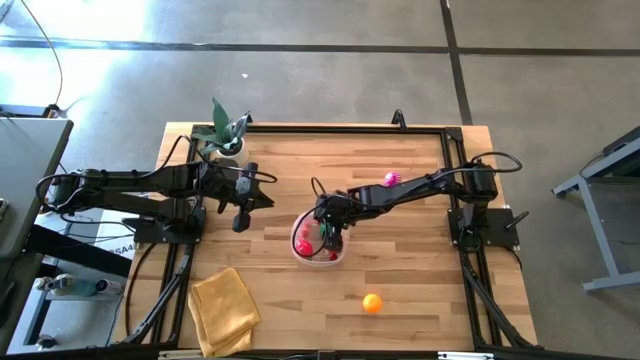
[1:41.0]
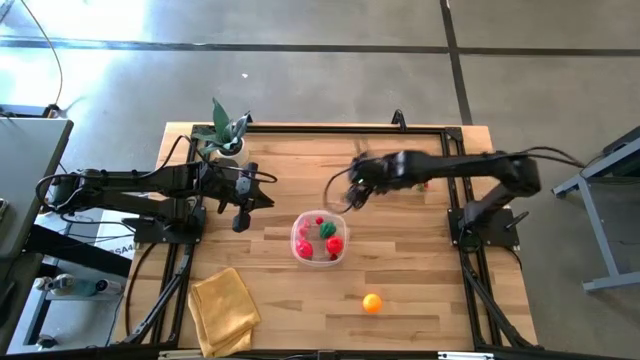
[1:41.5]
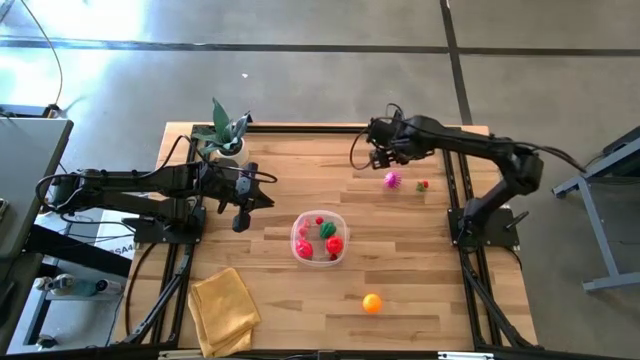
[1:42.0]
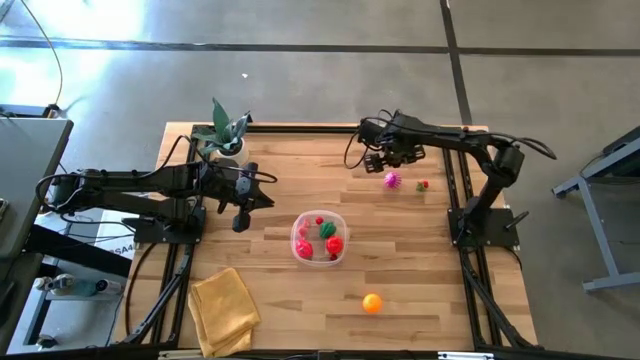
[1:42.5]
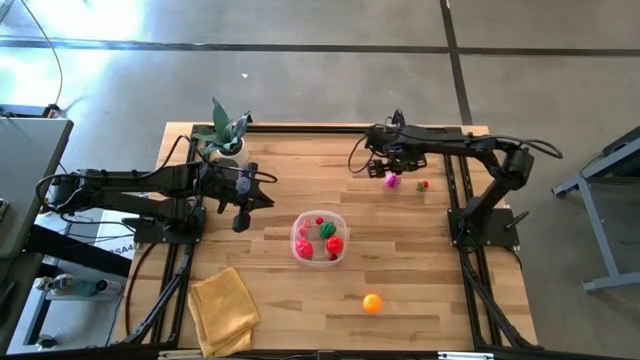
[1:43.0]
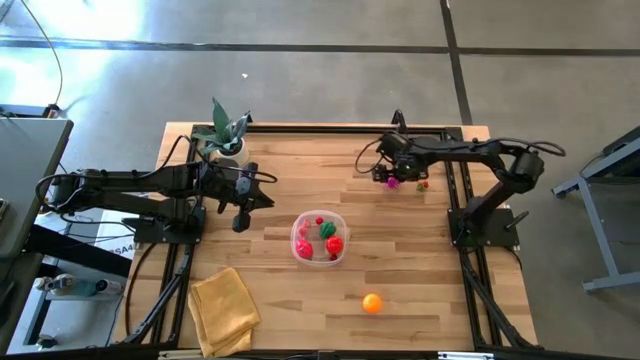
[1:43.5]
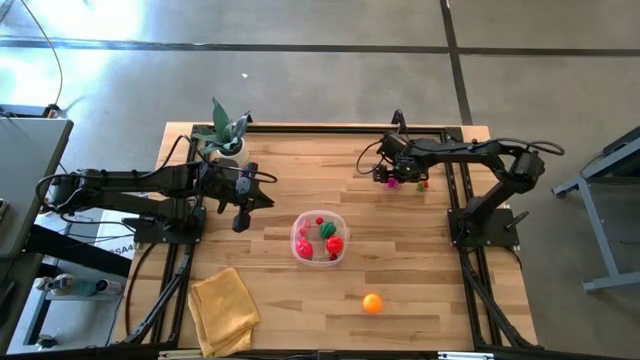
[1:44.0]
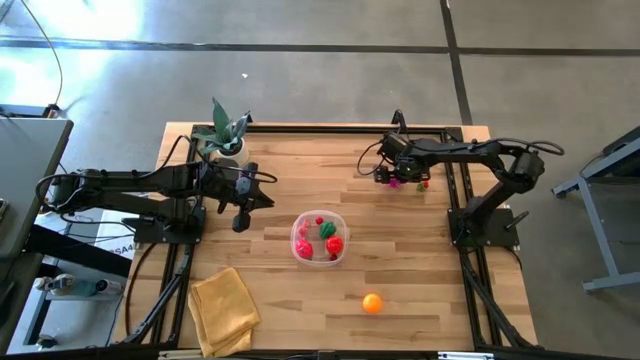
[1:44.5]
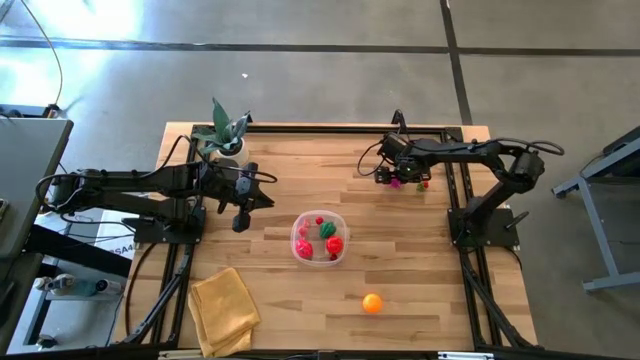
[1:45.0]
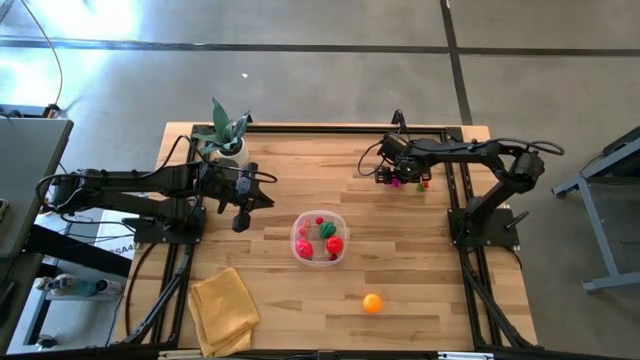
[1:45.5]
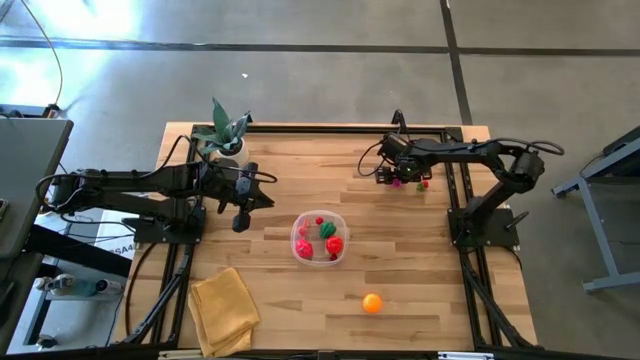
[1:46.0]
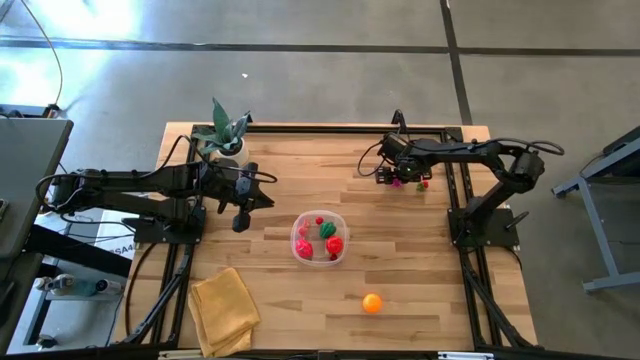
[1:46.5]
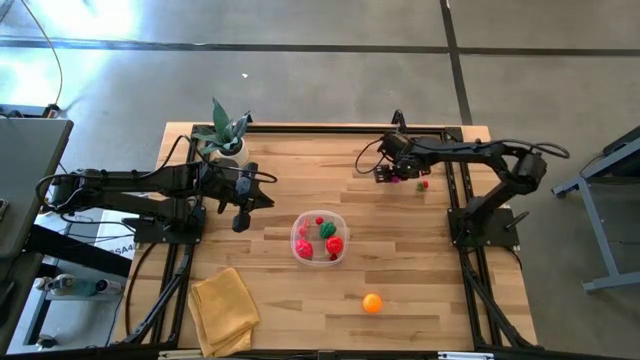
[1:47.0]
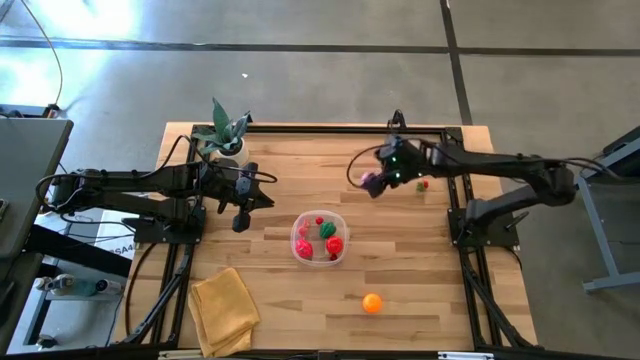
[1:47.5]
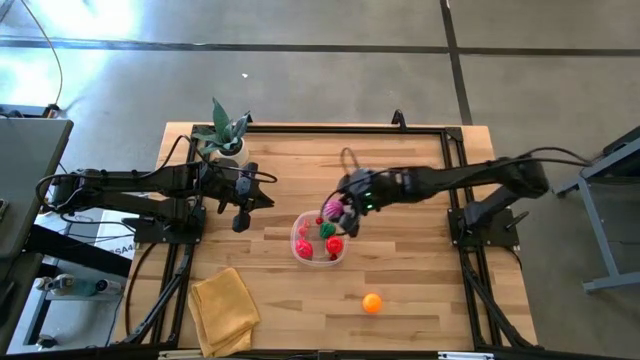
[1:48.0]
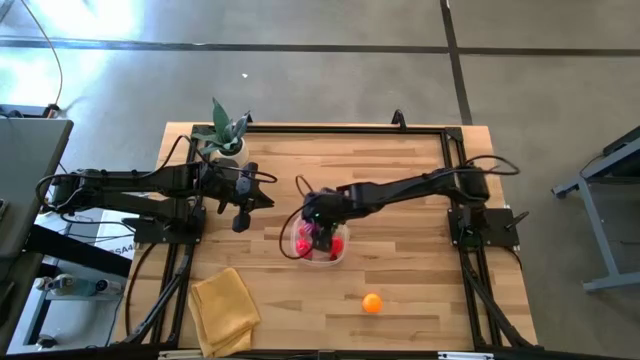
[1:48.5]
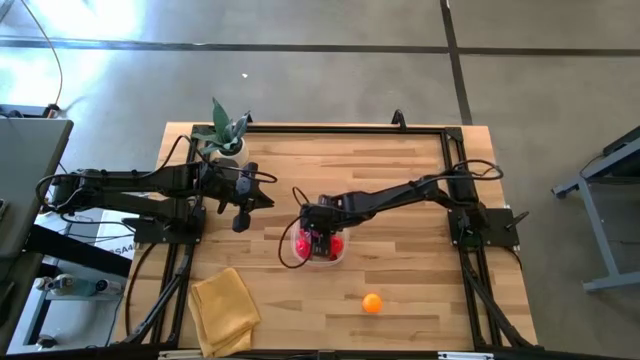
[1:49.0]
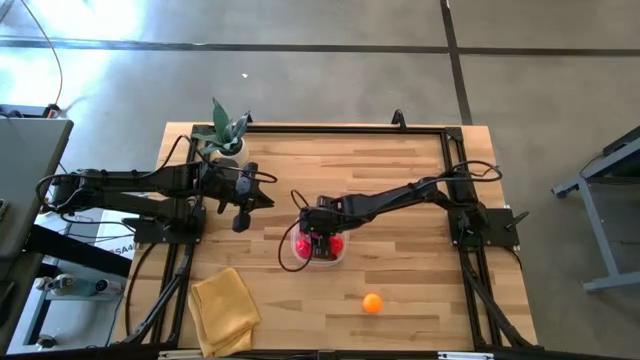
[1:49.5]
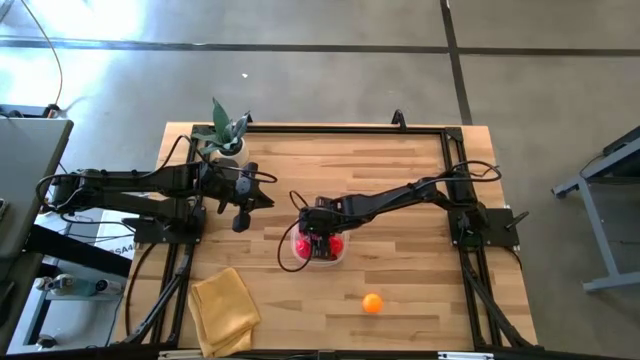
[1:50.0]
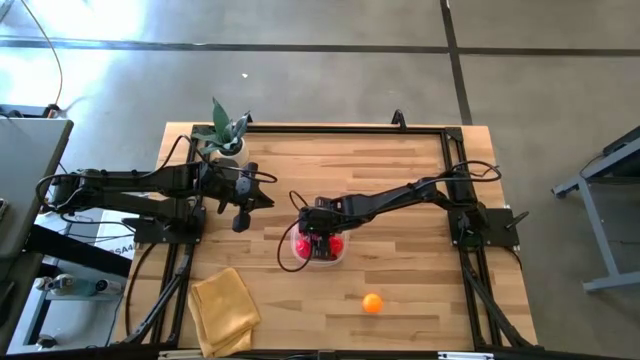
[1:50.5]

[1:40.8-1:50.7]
Task: Pick and placing Produce into tupperware
Put the purple onion into the transparent container

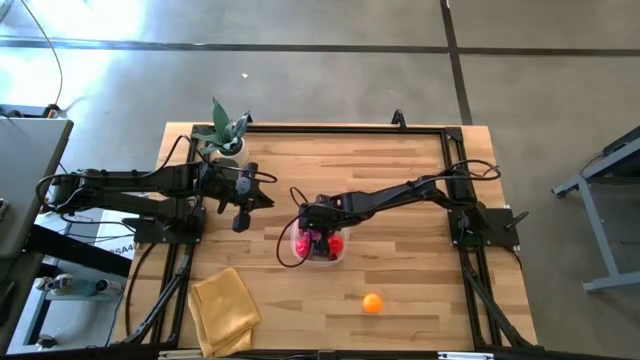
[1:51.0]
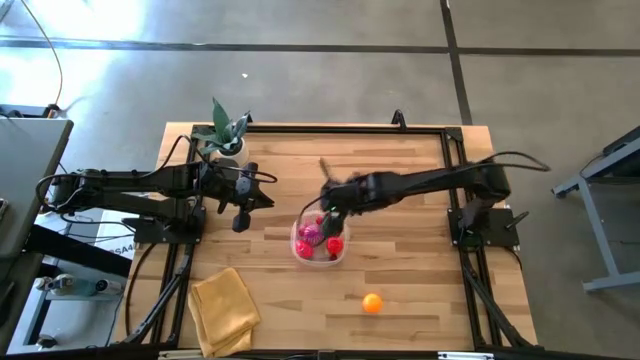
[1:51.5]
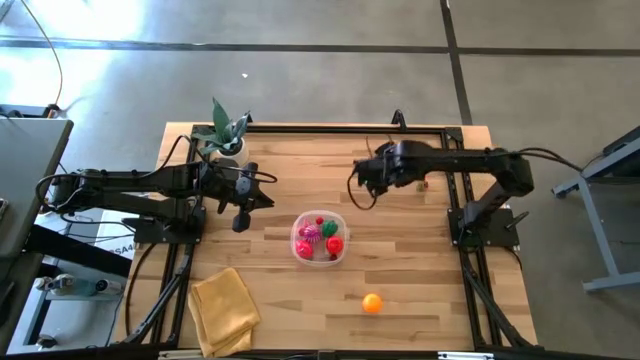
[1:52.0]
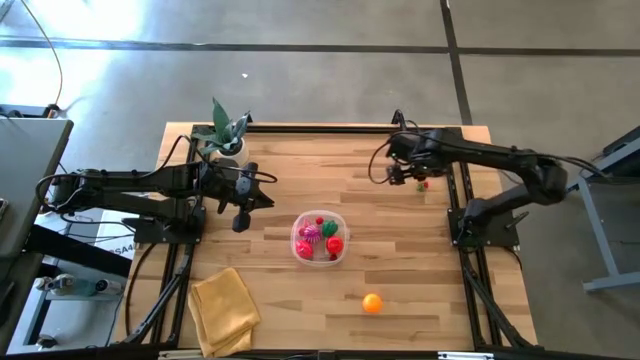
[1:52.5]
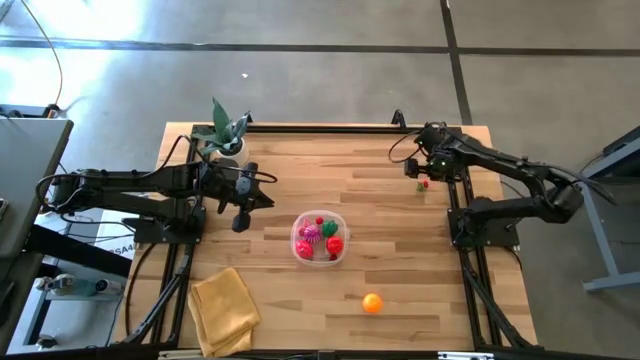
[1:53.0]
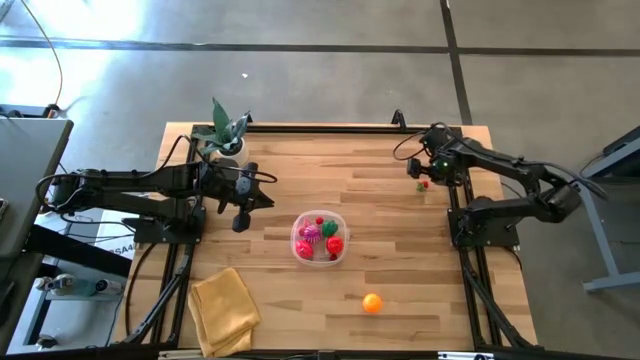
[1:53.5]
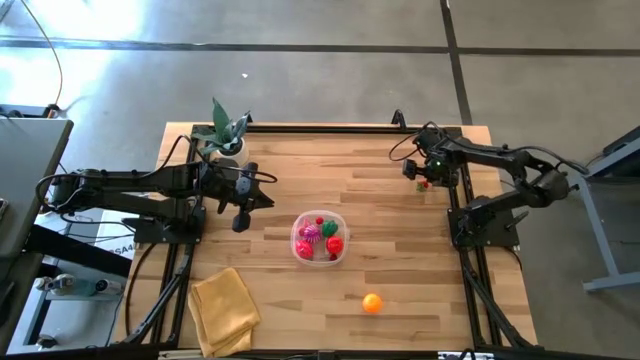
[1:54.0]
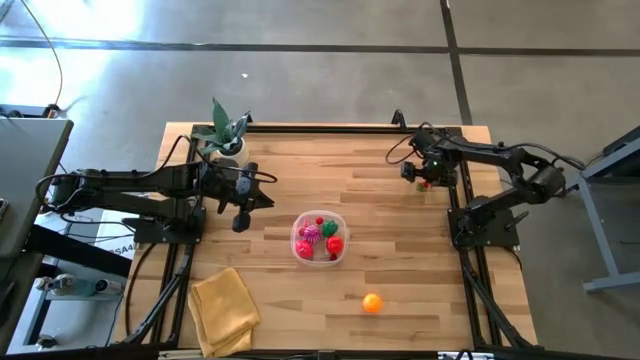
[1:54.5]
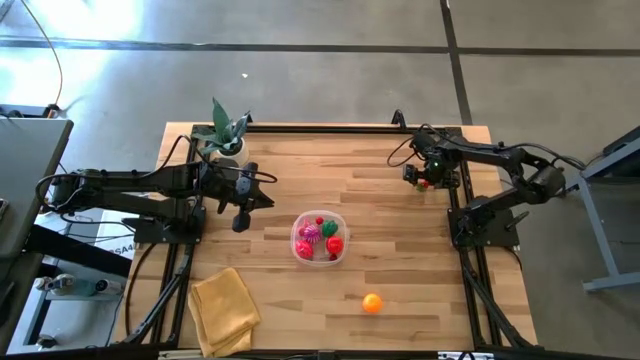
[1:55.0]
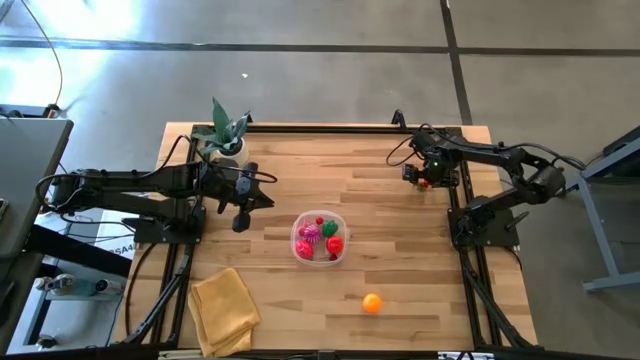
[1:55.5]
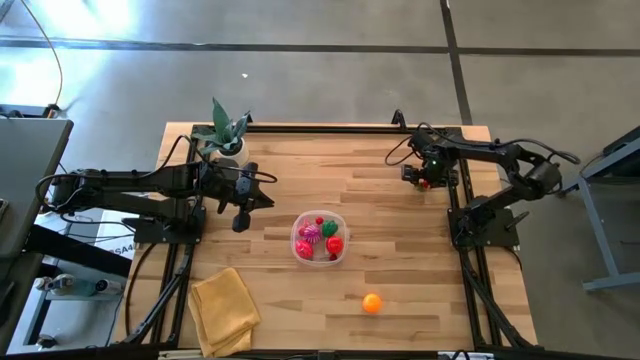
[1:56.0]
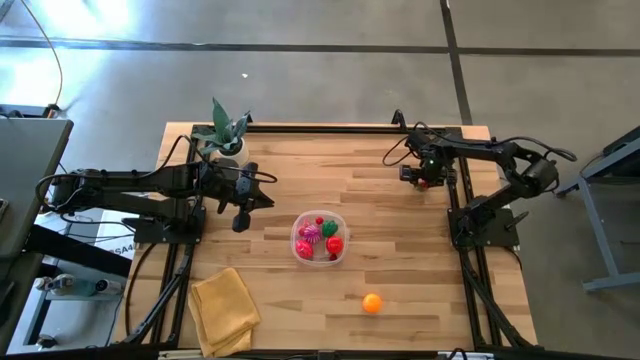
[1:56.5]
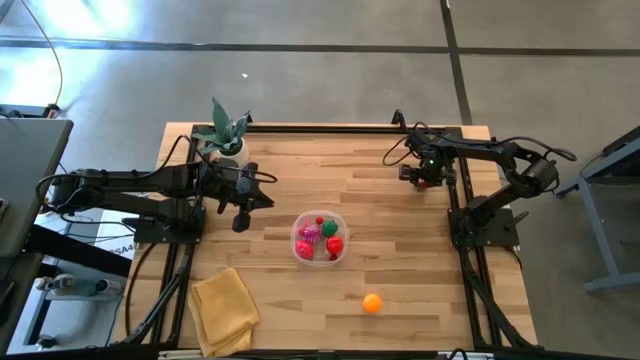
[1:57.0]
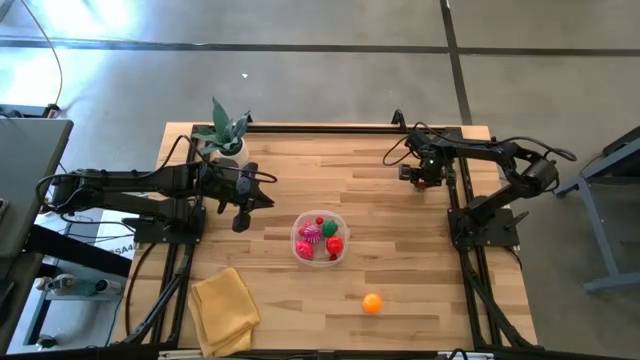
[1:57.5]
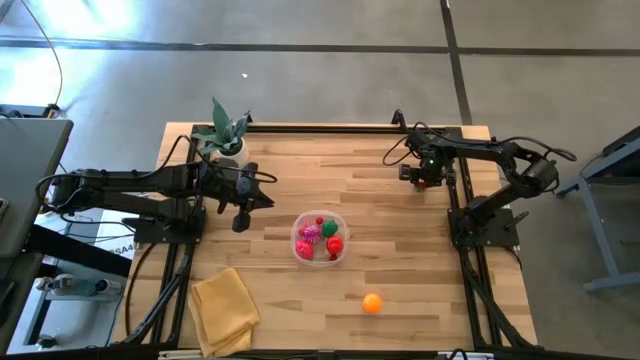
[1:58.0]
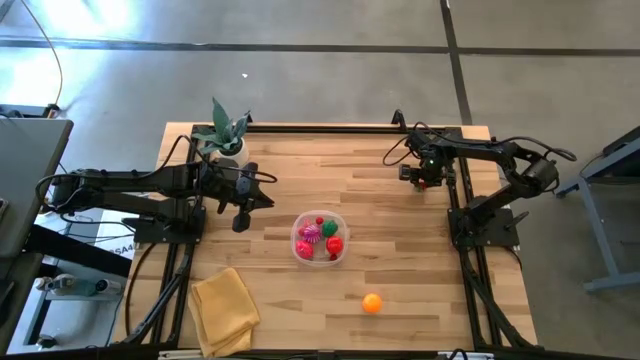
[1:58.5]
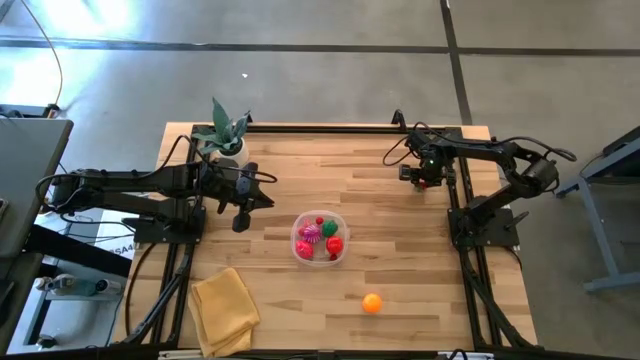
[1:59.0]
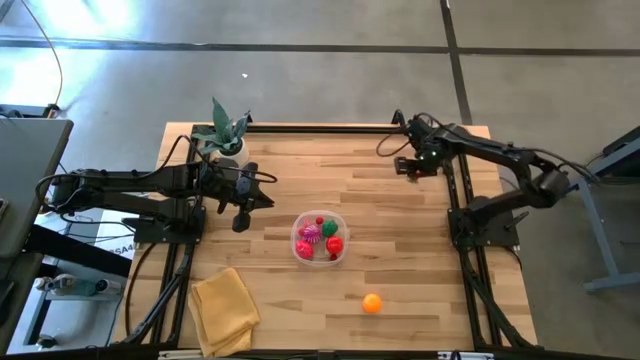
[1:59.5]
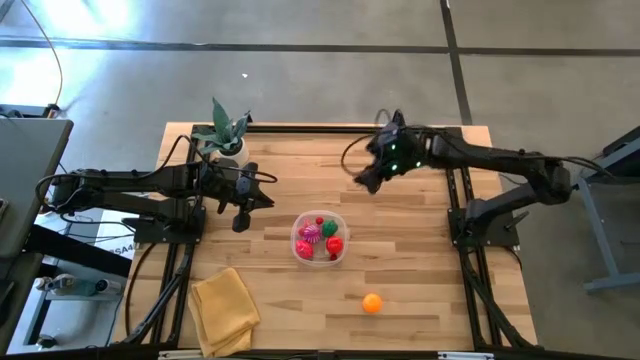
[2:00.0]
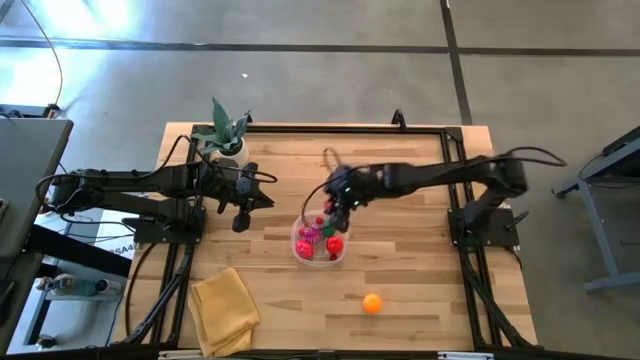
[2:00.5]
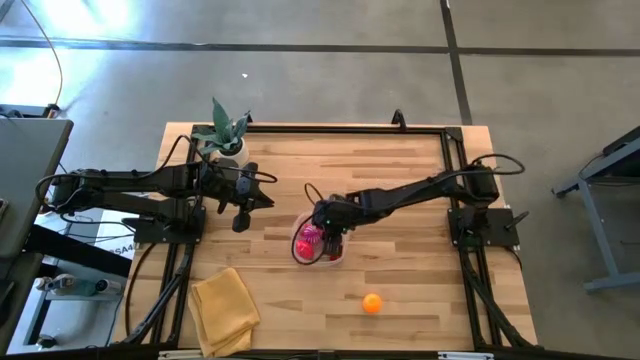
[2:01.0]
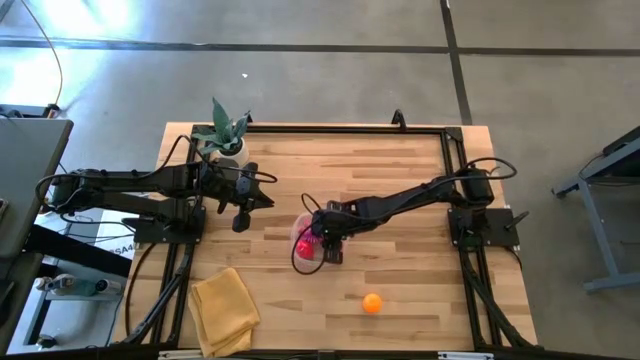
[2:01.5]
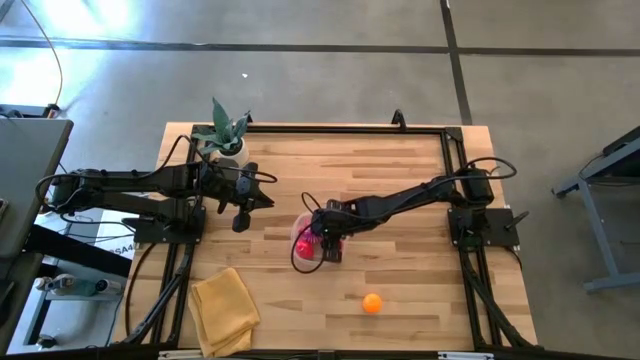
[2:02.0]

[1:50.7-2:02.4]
Put the red strawberry into the transparent container
